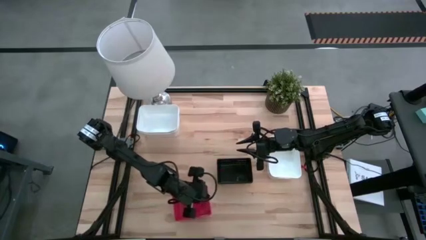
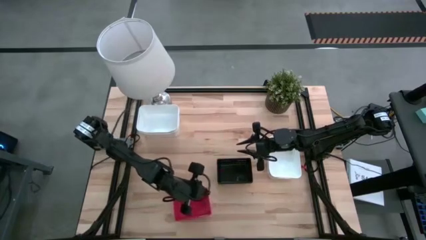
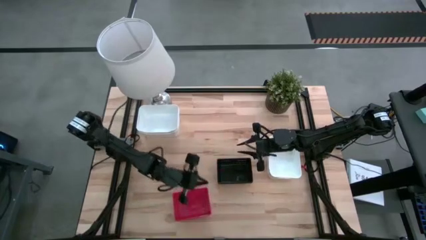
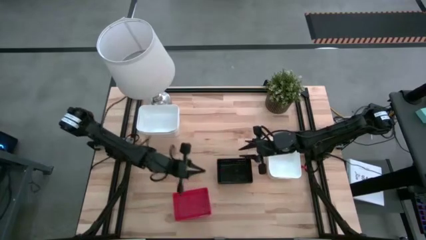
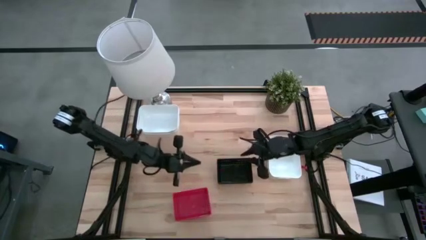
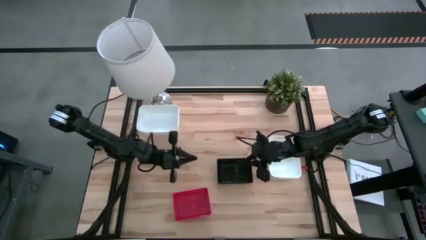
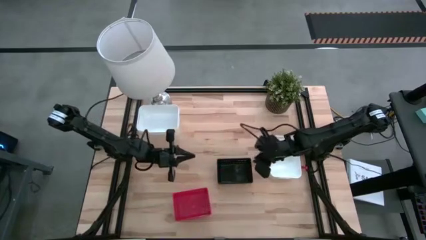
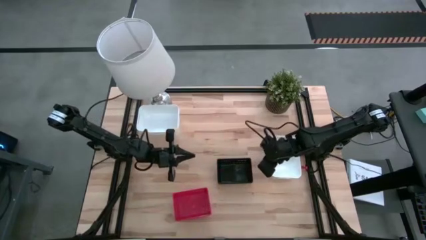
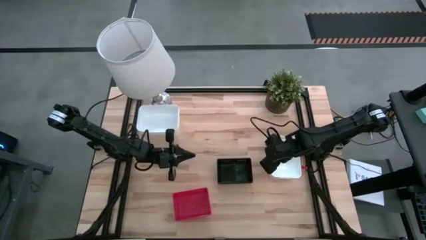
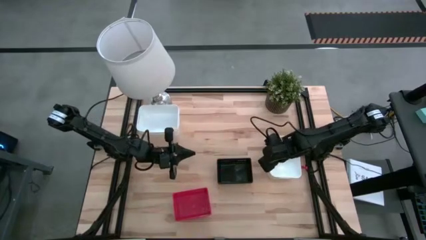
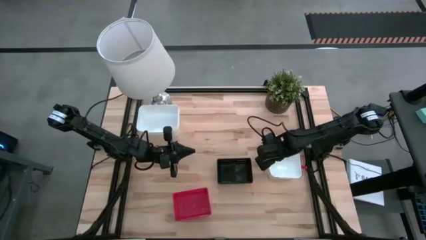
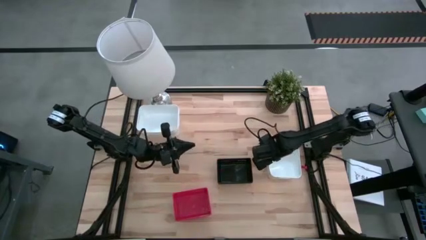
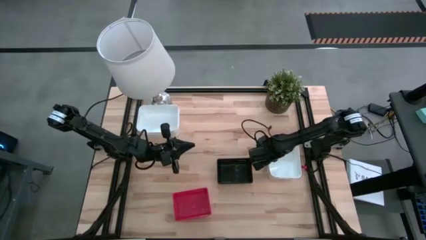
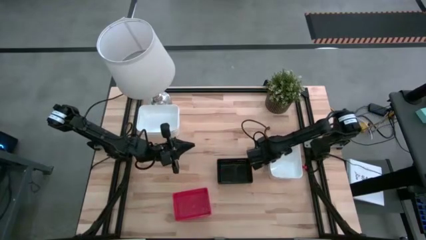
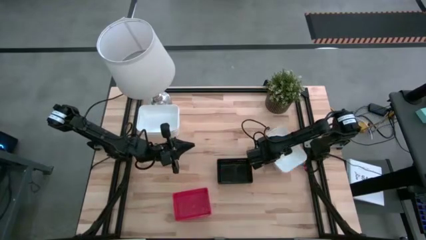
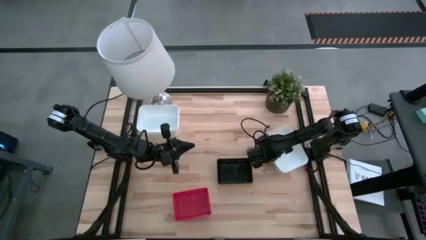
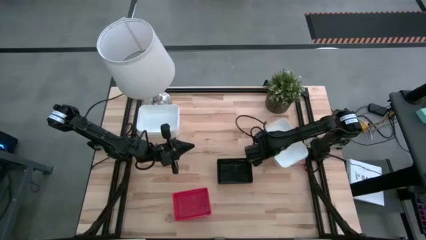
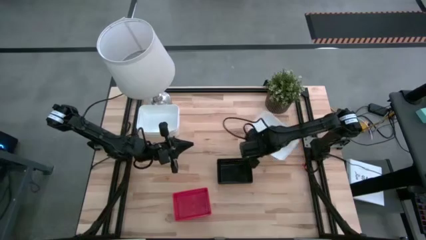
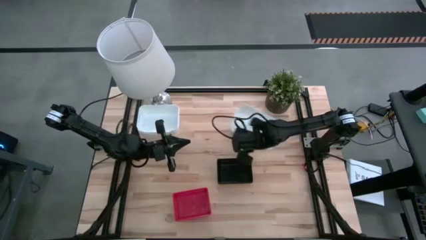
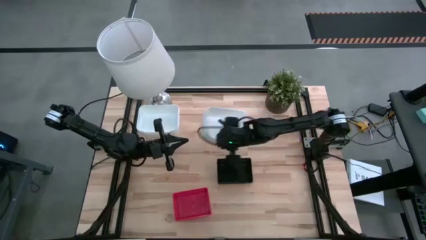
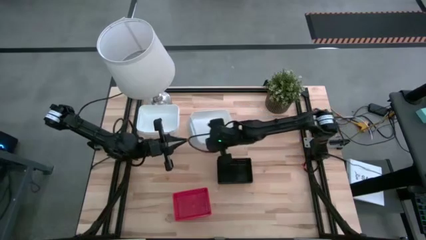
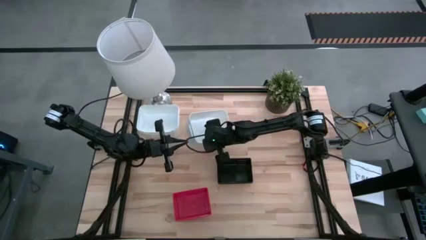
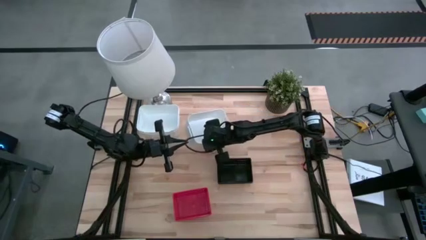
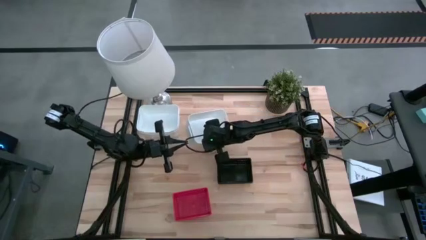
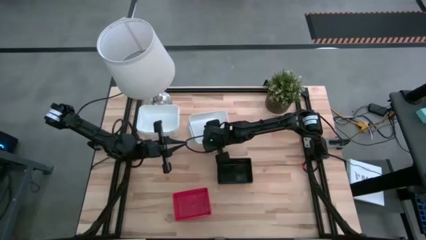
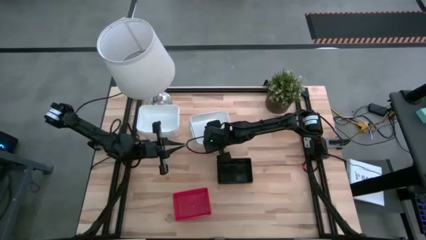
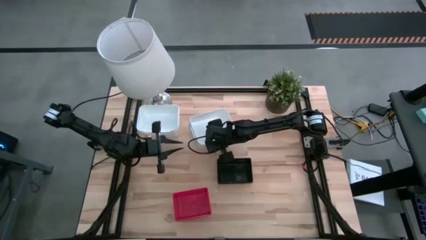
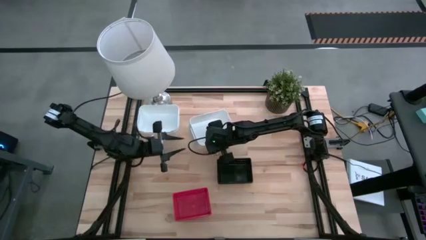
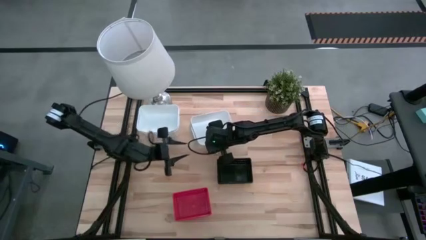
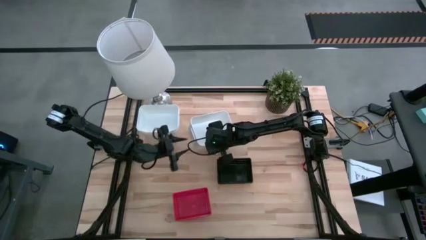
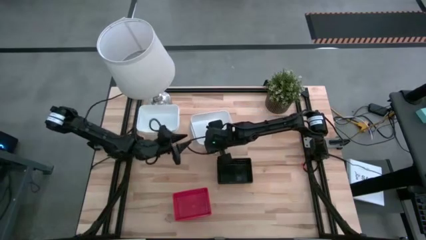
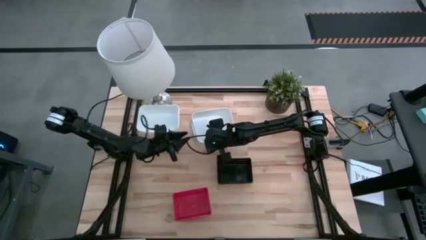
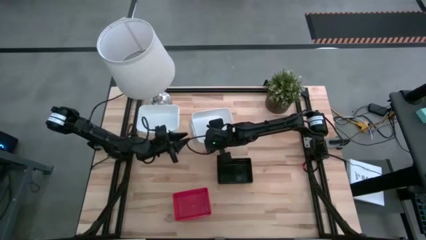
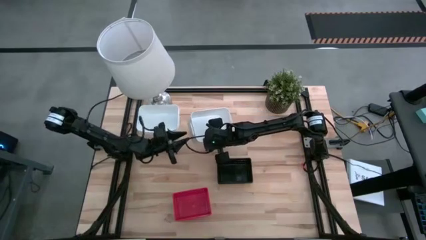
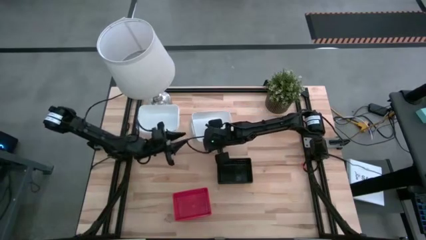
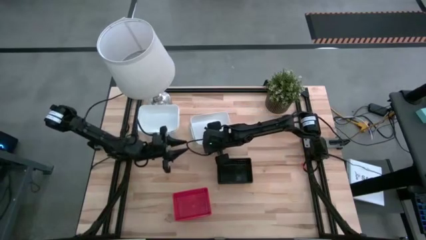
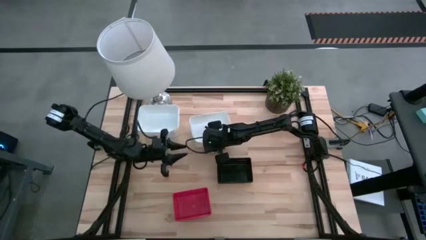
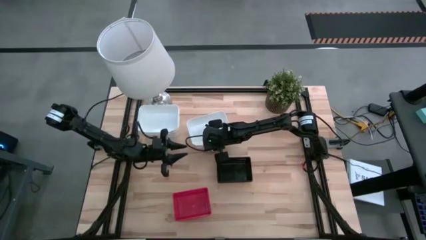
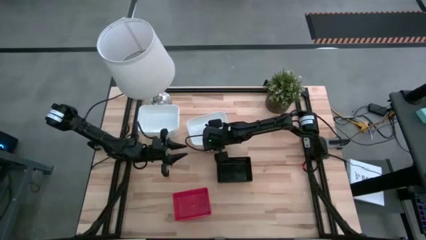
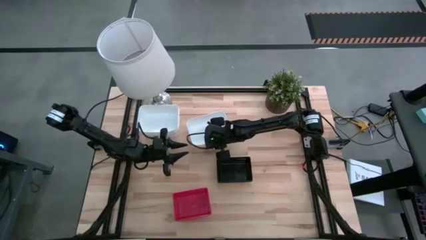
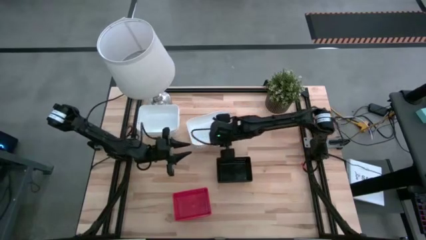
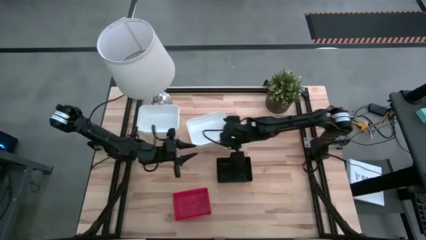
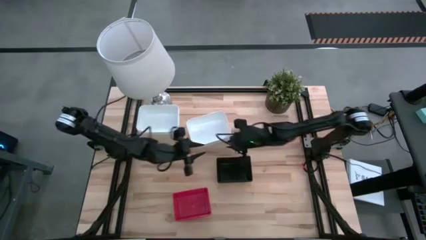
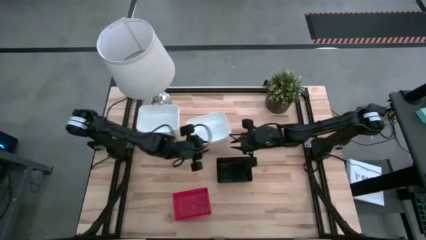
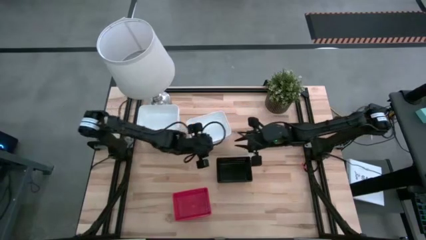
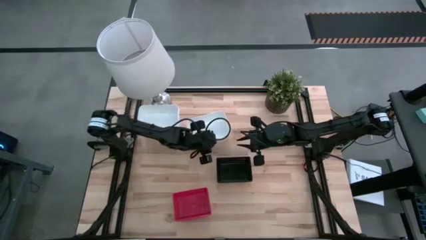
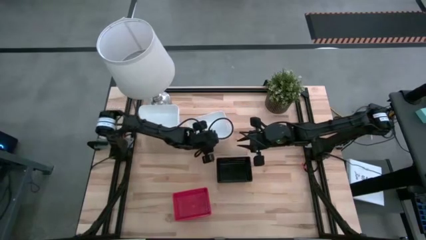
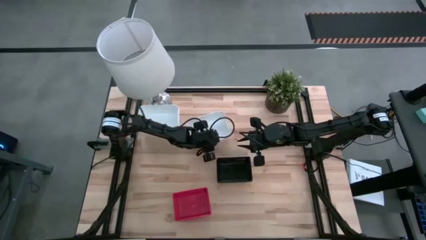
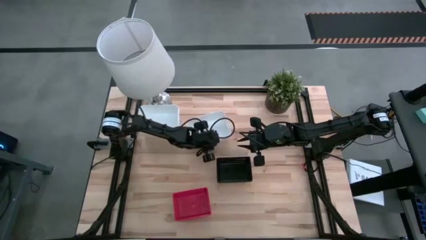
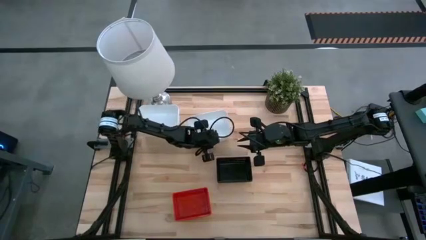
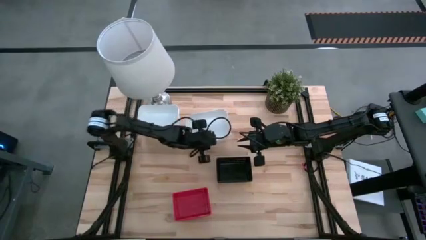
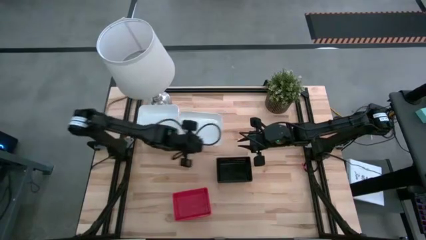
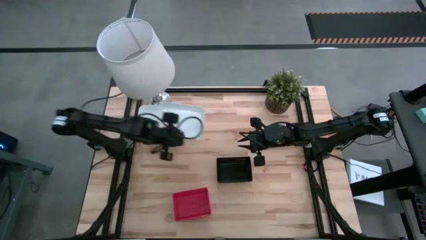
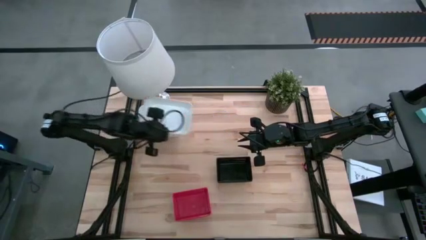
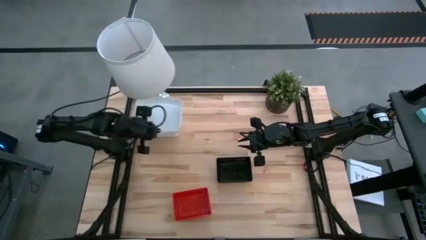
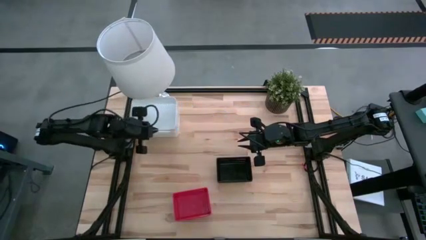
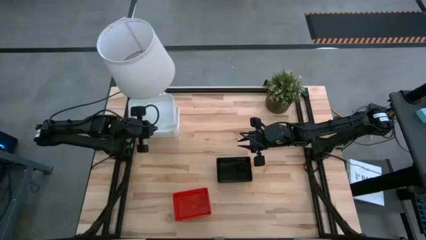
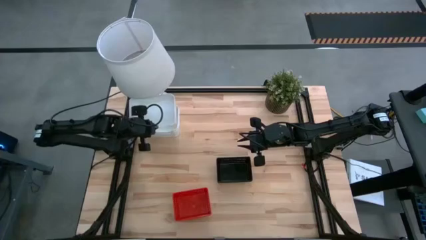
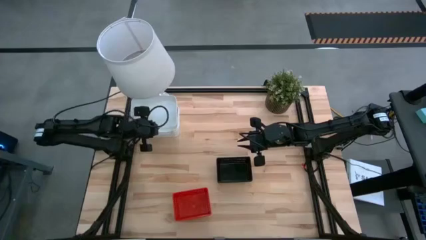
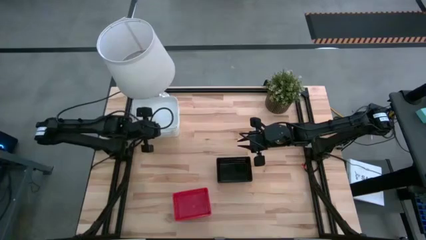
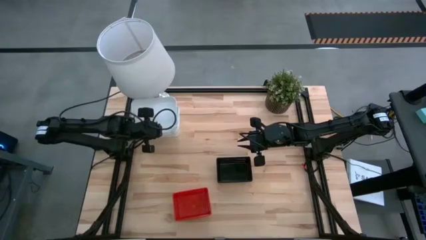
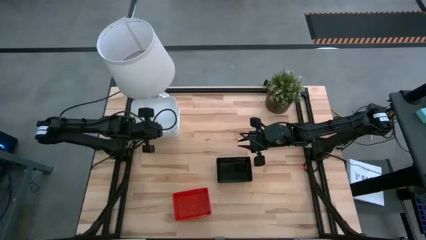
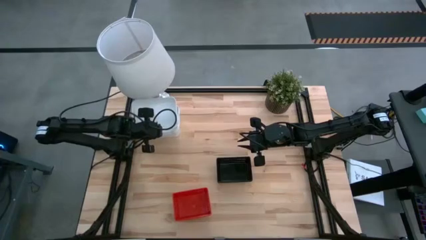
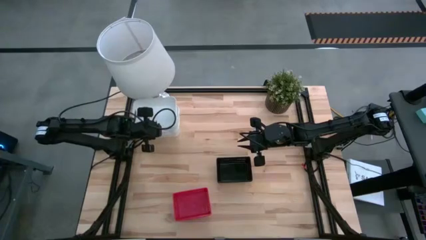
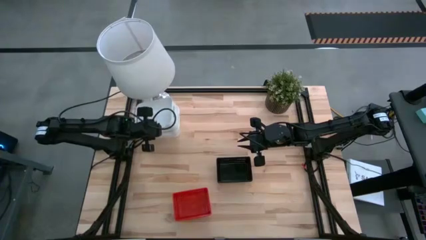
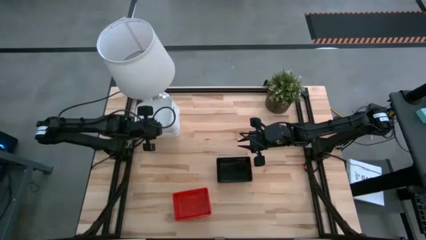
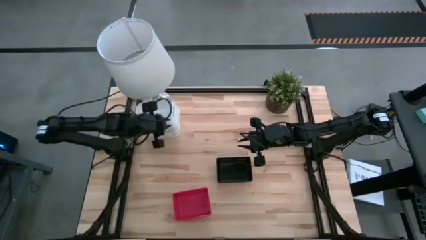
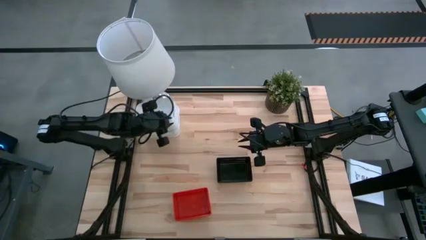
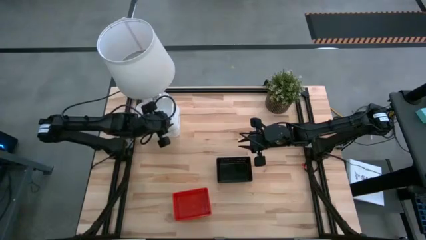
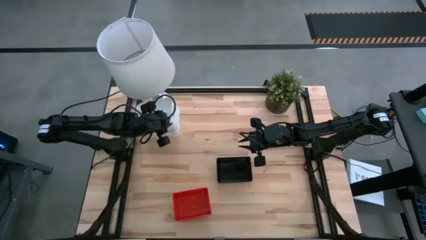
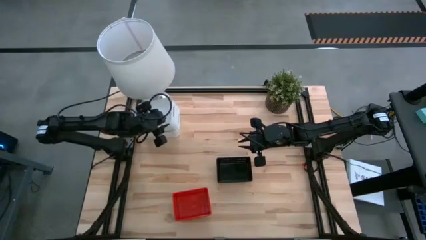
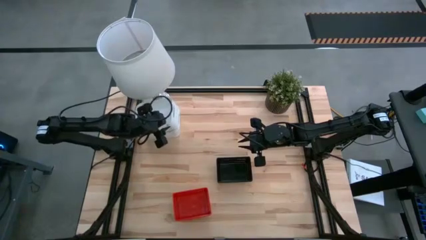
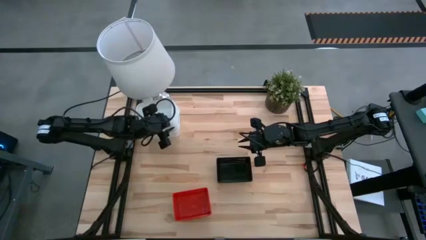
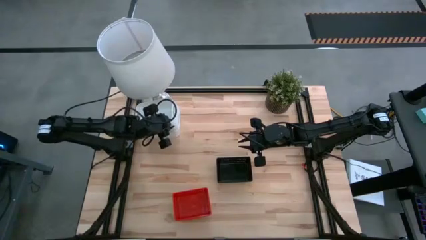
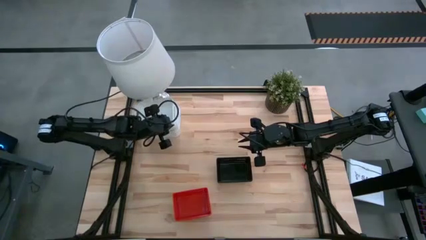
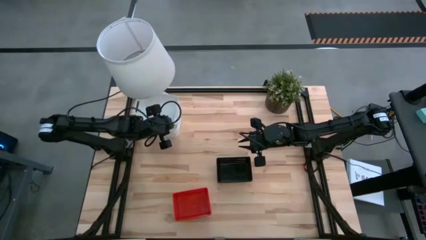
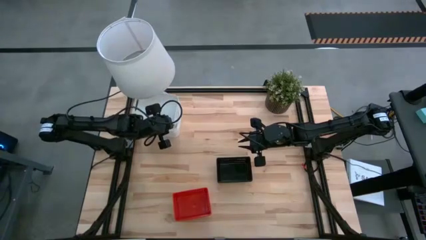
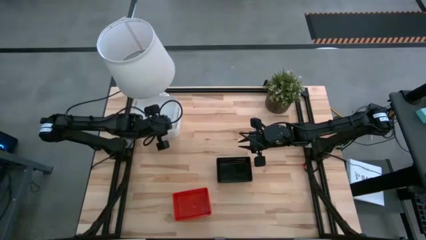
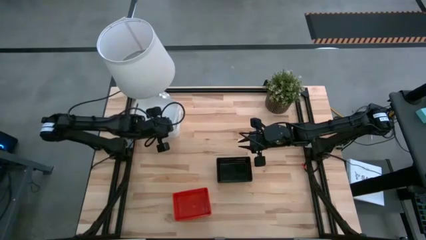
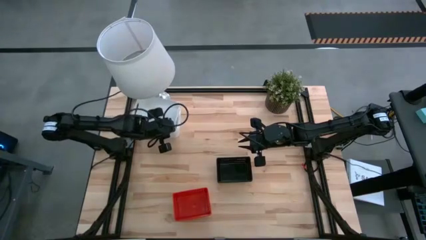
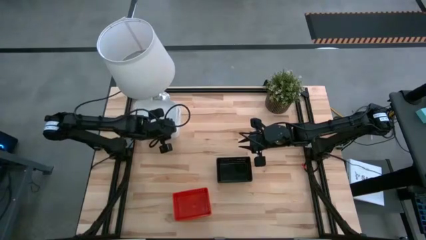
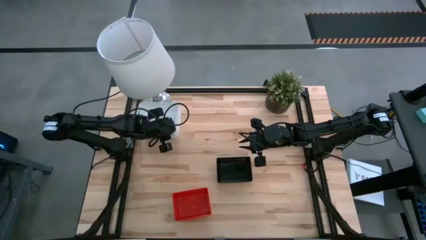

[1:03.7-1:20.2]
Stack the white bin on top of the top white bins
